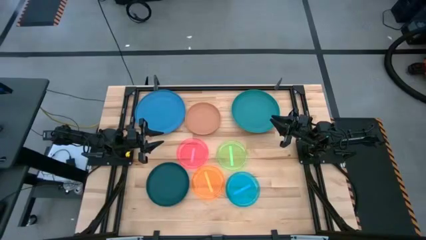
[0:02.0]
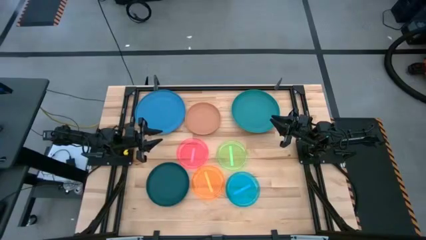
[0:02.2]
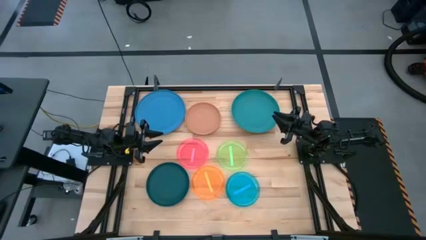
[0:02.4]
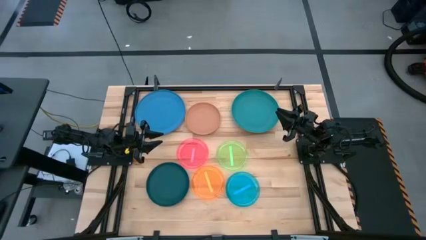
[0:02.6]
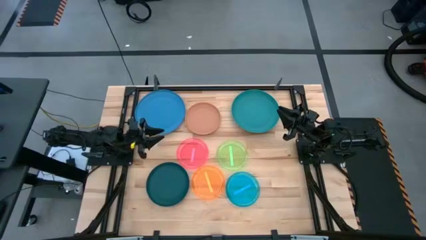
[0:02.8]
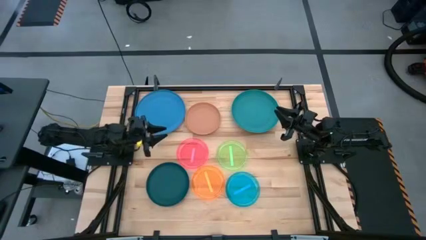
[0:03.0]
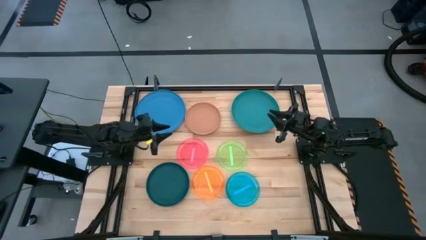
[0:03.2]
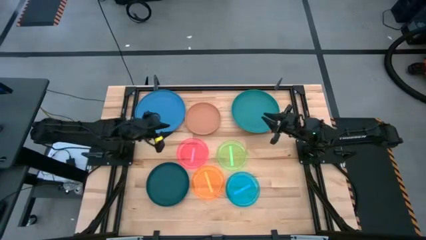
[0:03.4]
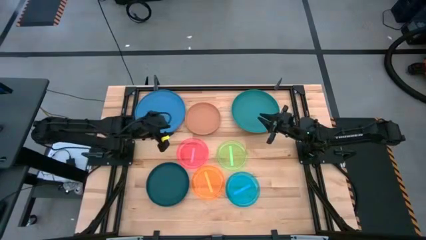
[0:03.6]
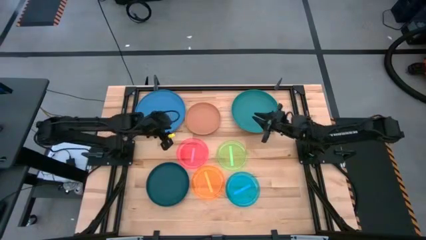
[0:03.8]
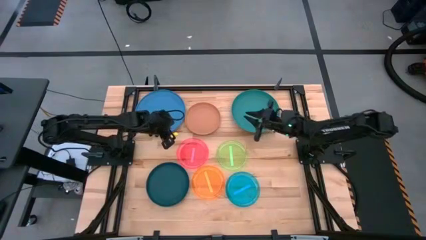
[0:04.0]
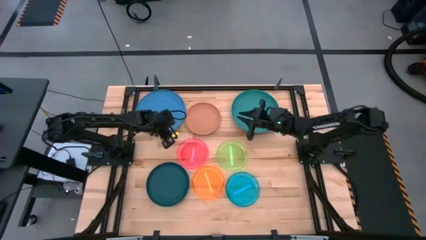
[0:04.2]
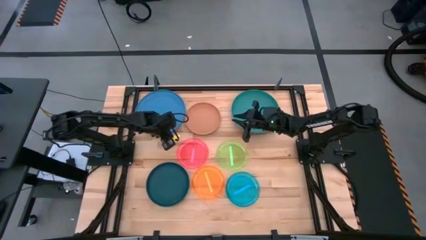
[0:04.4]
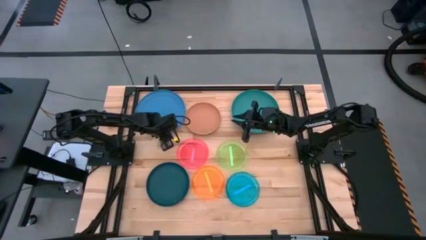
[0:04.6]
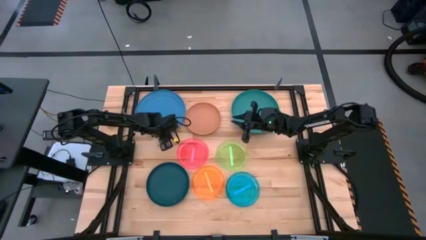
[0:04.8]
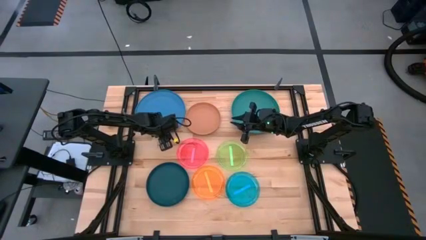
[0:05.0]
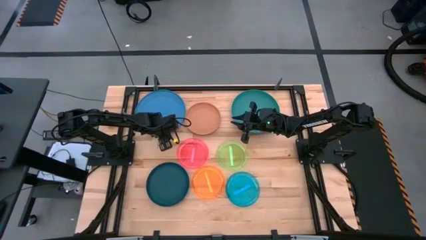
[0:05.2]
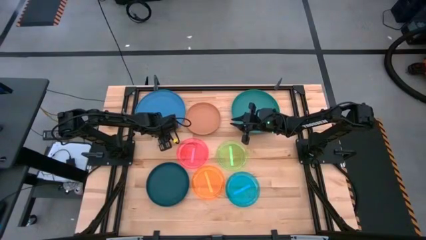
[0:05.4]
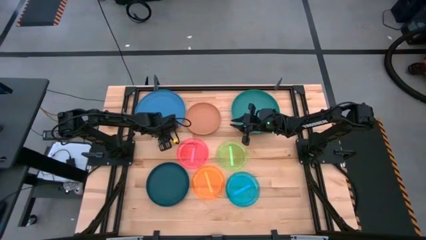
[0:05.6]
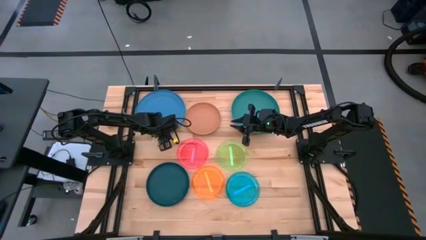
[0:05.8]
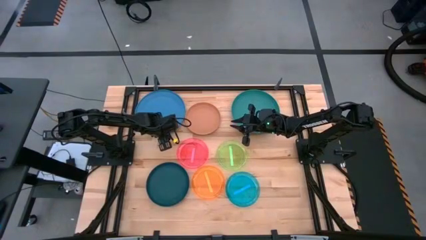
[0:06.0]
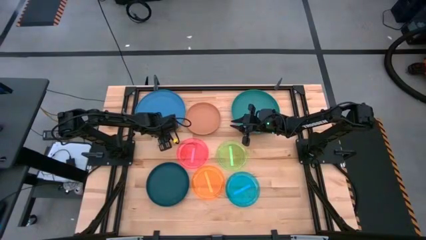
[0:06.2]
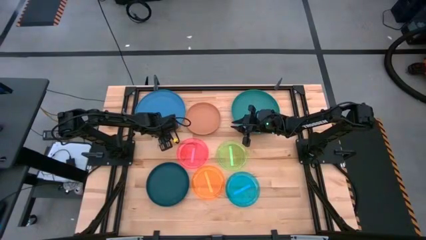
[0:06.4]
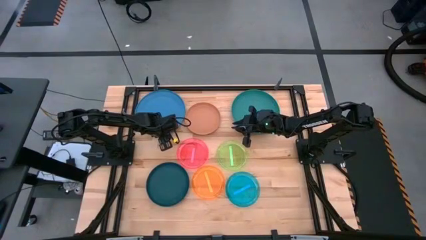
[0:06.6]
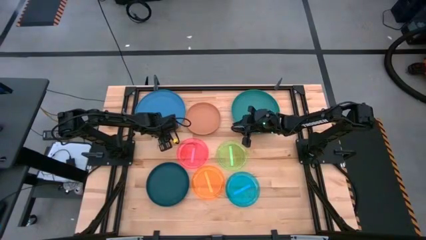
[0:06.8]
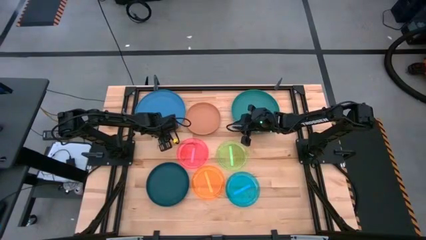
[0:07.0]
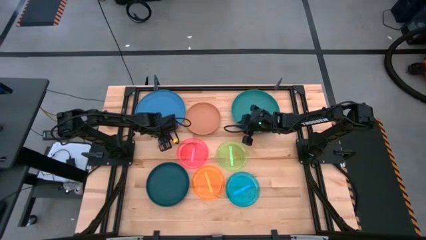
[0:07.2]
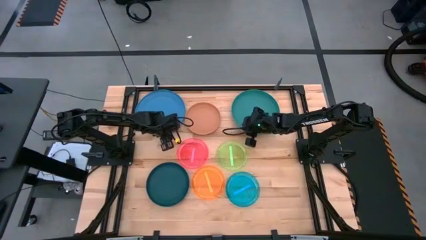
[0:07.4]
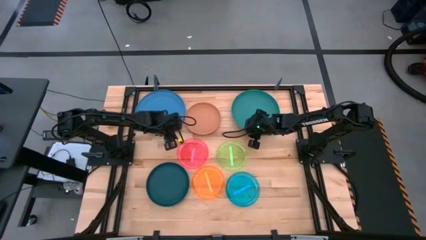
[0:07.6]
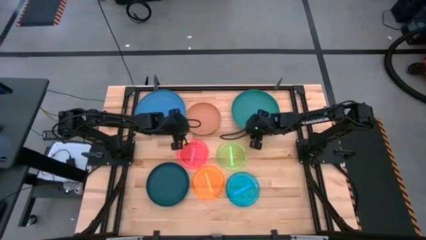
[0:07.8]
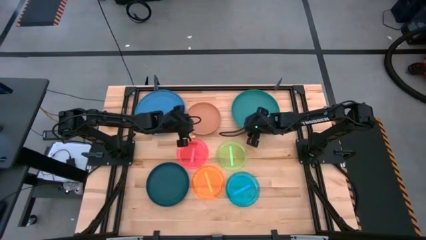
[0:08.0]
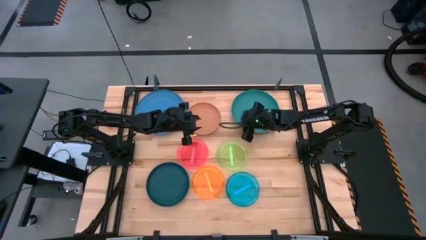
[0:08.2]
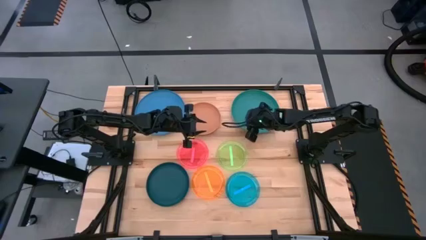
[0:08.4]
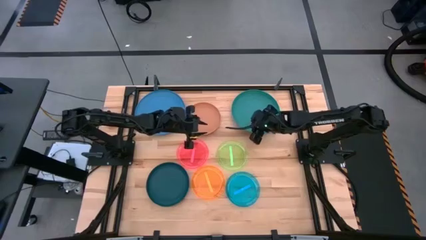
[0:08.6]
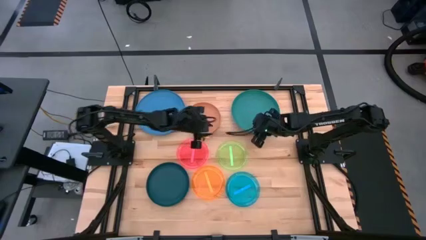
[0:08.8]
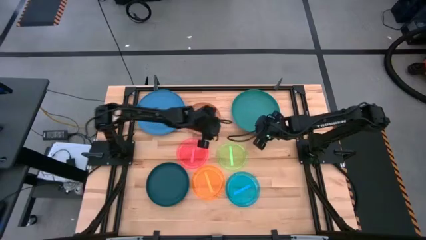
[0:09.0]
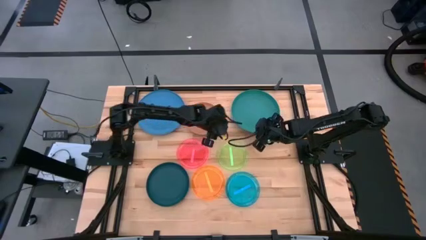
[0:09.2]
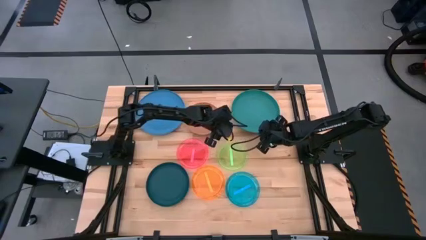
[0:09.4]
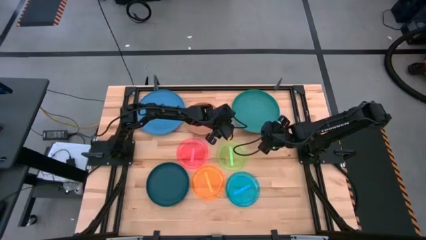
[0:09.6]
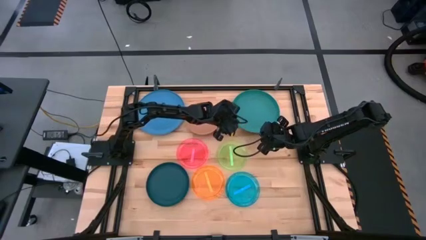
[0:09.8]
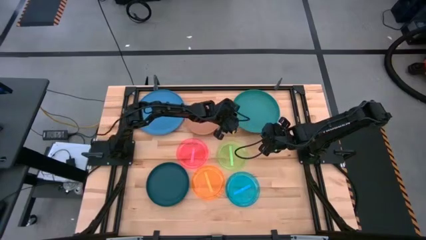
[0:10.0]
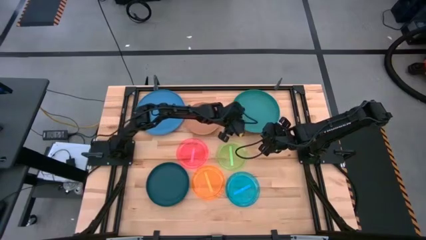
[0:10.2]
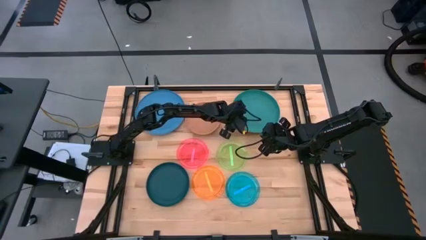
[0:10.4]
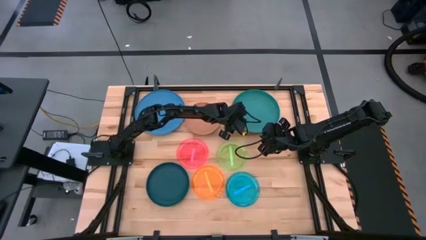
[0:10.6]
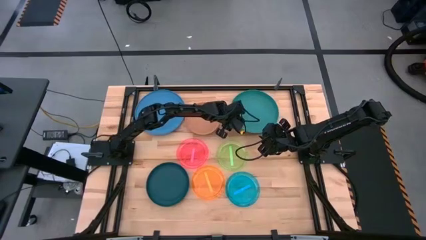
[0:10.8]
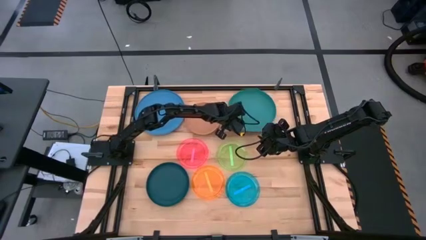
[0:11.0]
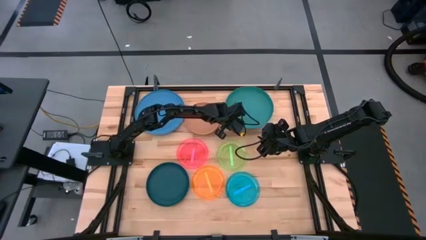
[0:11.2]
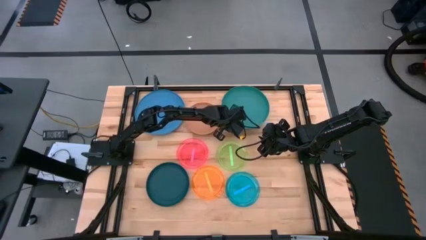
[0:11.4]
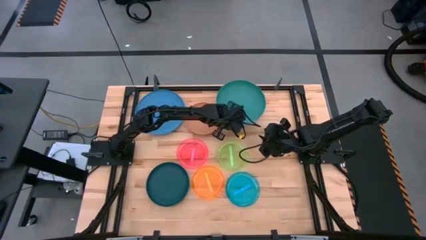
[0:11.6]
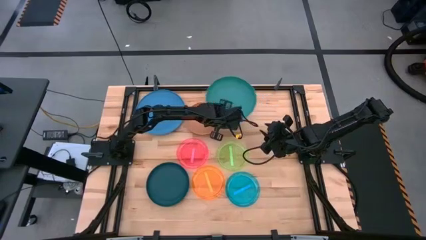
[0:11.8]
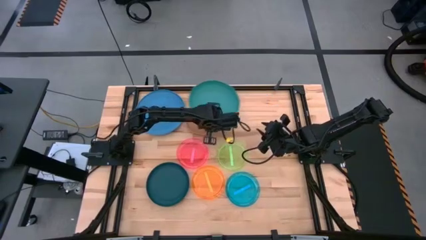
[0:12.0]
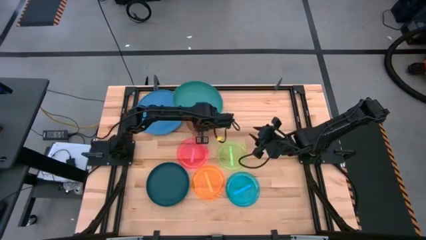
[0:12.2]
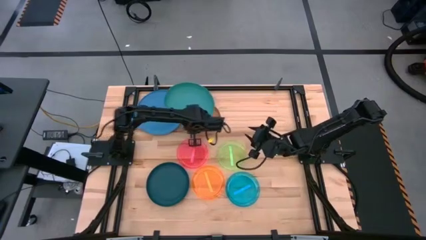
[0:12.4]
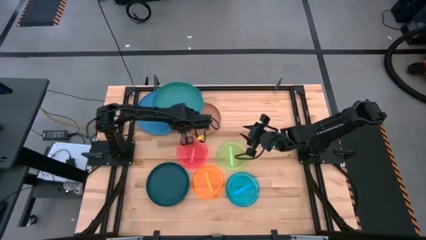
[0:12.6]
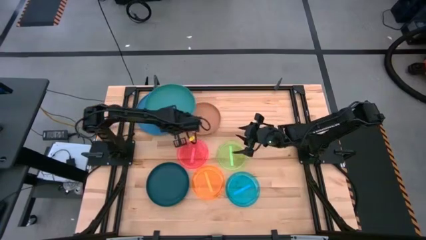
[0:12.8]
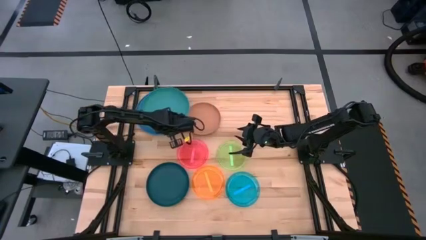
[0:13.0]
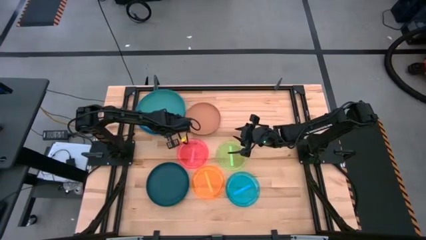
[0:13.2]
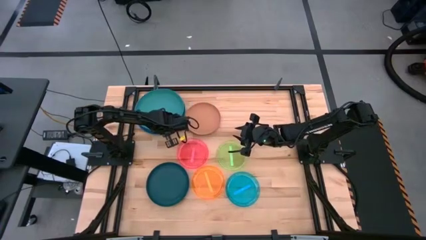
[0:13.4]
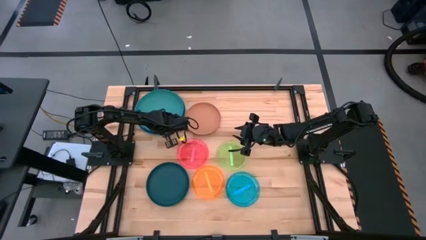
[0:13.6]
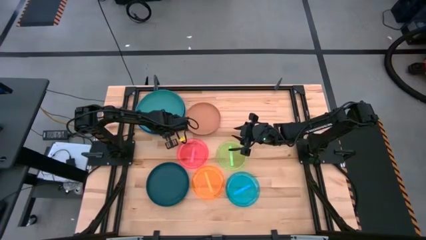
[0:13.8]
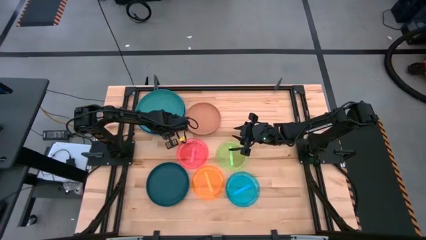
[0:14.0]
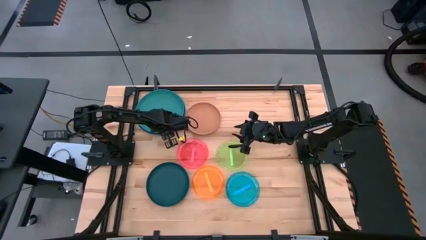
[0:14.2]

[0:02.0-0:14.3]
Task: Stack plastic plates
Stack the big green plate on the big blue plate

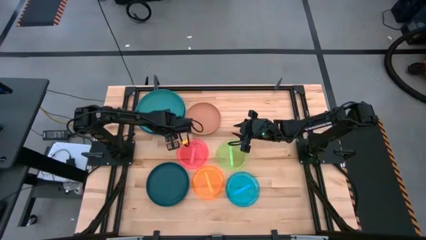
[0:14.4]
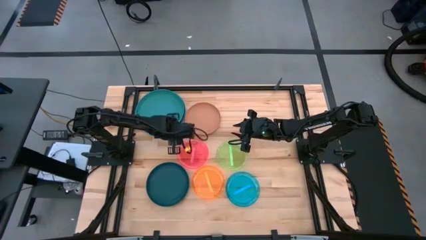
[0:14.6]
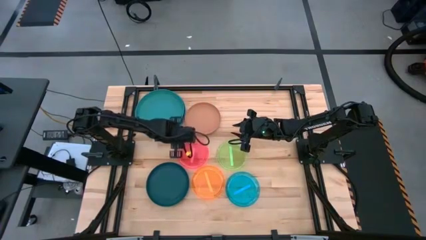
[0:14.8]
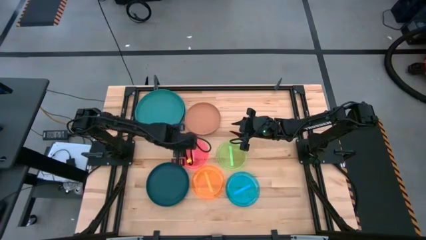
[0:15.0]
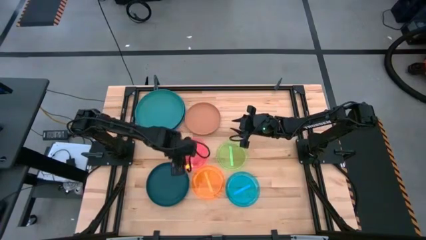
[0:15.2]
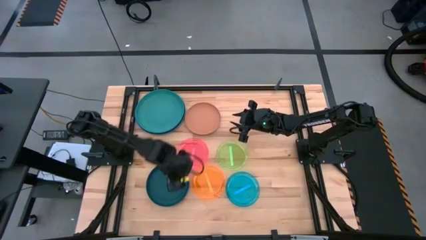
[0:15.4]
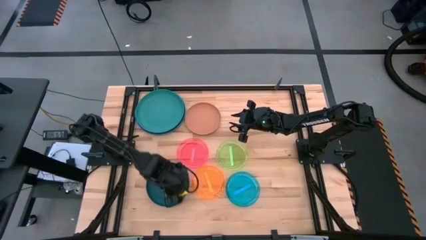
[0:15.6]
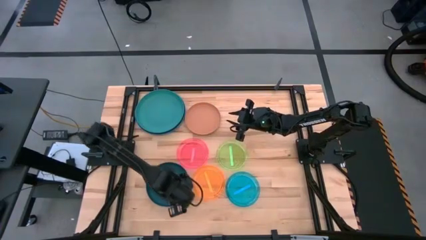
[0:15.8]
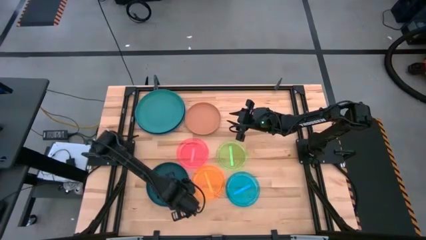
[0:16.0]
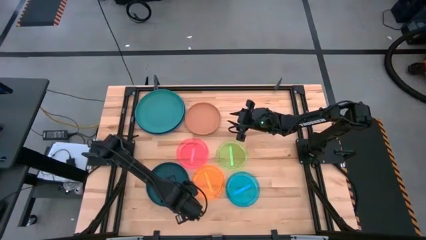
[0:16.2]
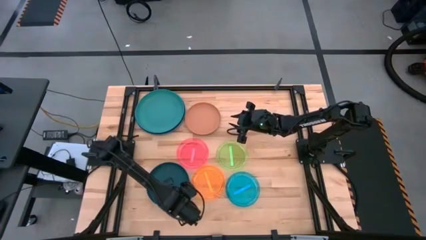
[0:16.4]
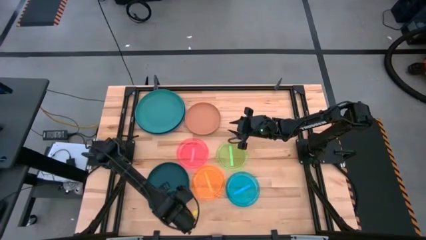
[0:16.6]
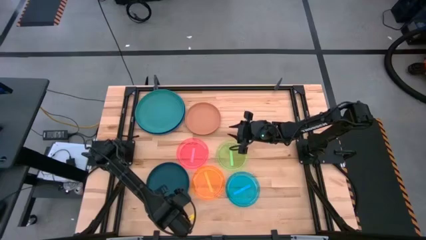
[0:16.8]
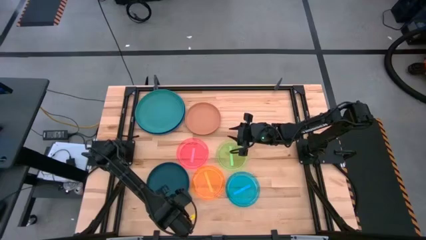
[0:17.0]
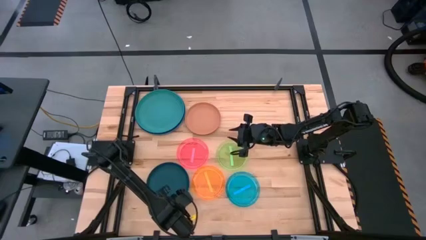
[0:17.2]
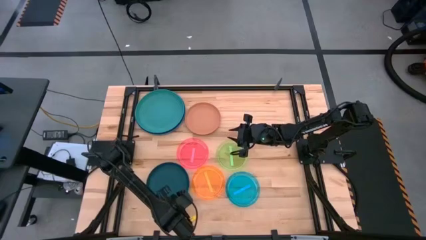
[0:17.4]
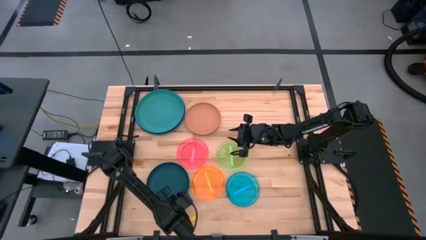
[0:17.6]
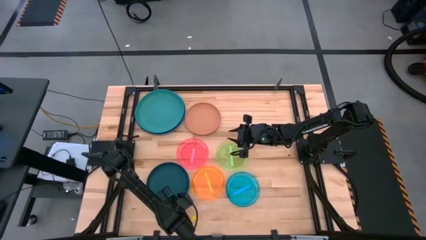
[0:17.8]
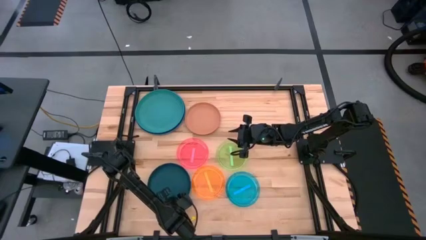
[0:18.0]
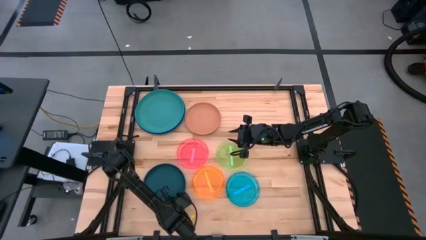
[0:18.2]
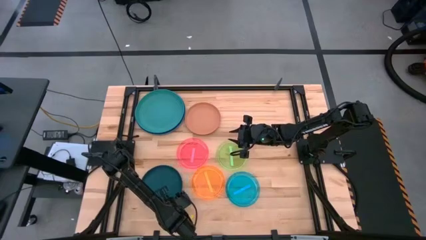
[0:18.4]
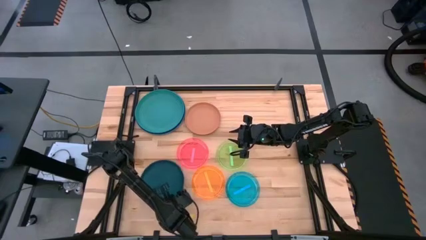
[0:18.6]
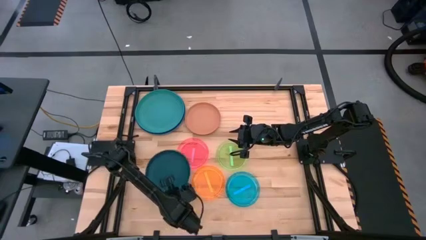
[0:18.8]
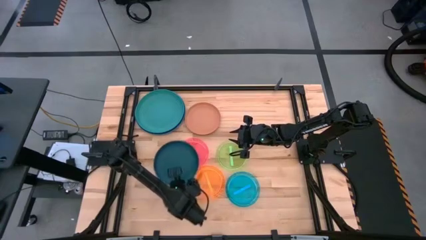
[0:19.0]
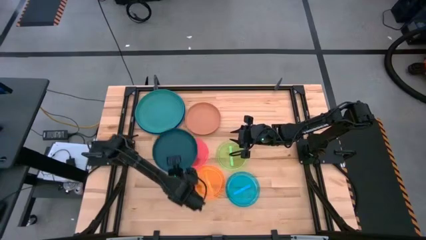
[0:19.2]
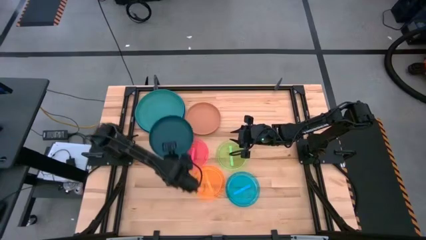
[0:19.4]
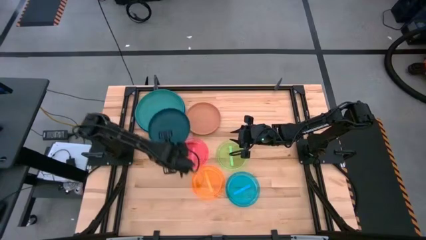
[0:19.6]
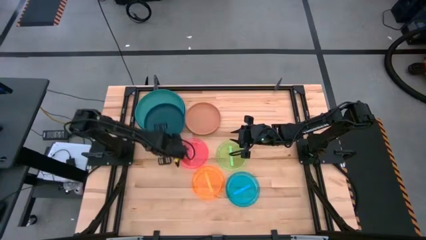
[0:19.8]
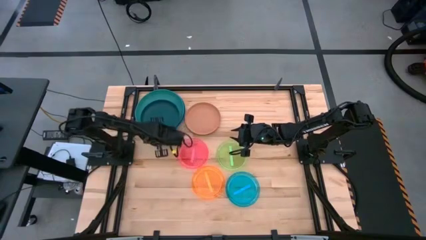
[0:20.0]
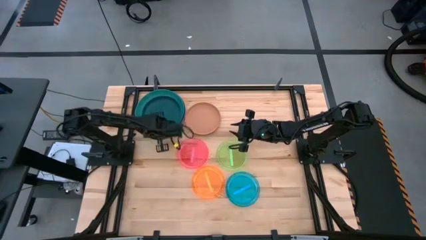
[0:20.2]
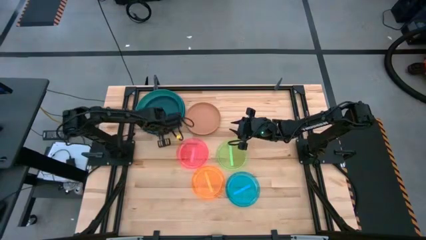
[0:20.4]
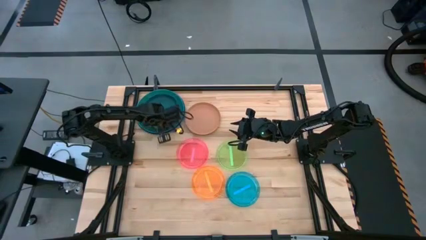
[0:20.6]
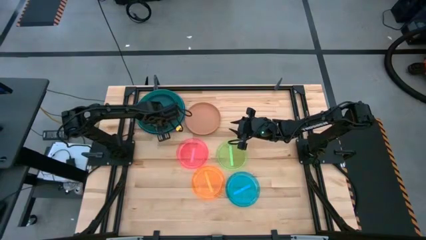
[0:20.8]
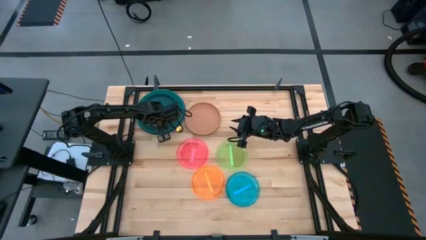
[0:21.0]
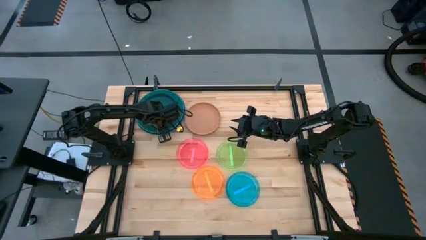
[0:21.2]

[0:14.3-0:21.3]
Stack the small dark blue plate on the big green plate
